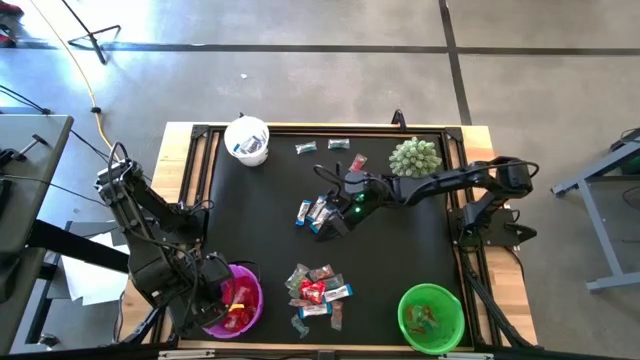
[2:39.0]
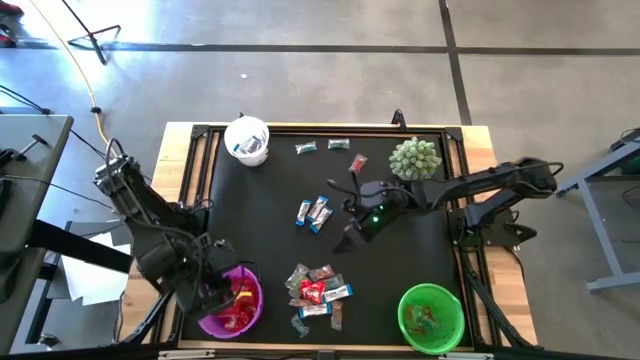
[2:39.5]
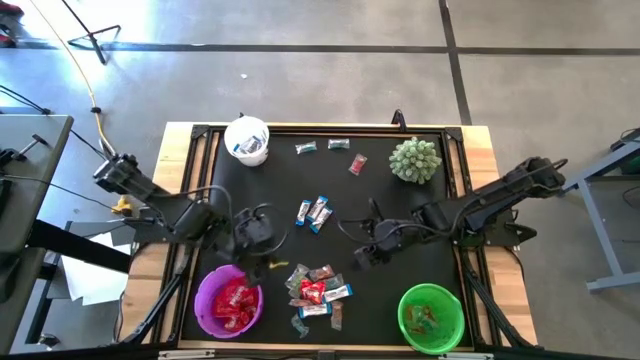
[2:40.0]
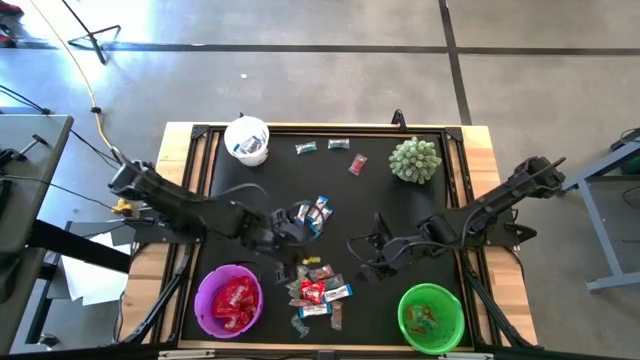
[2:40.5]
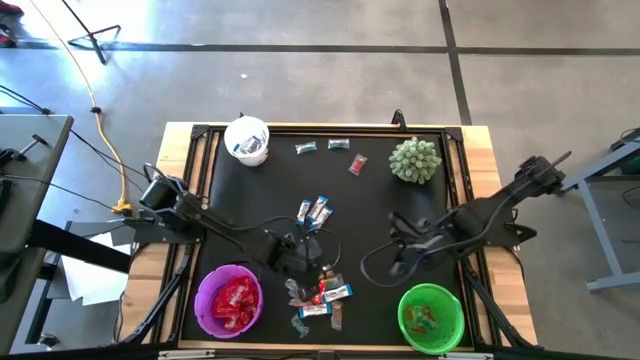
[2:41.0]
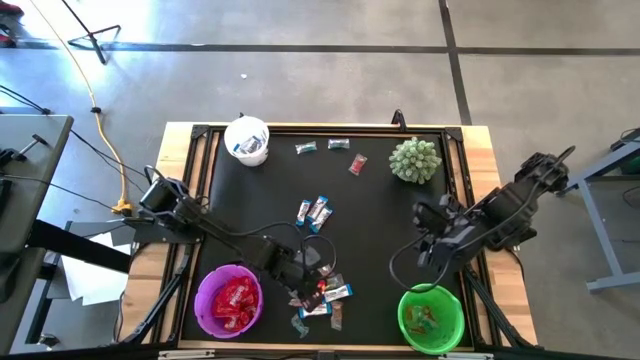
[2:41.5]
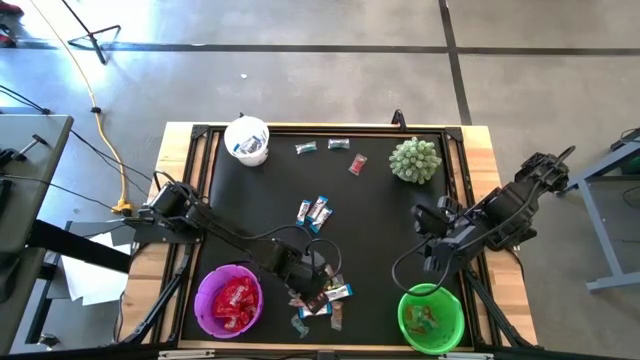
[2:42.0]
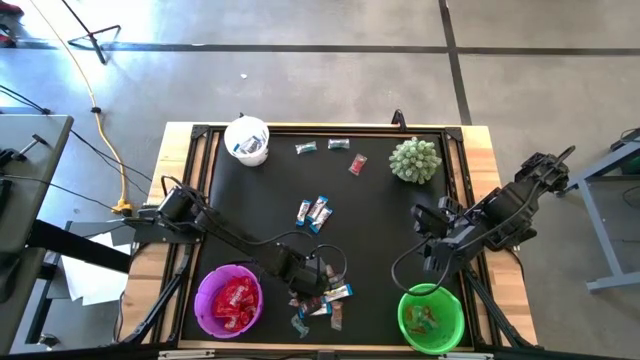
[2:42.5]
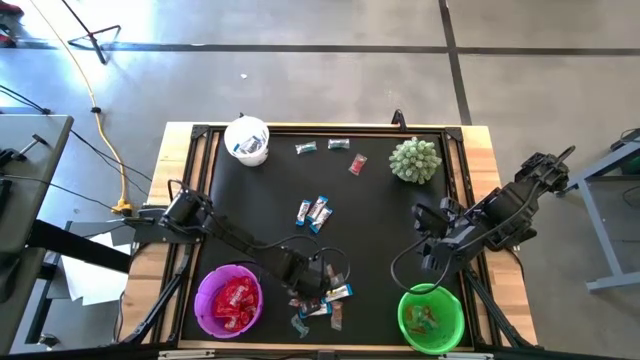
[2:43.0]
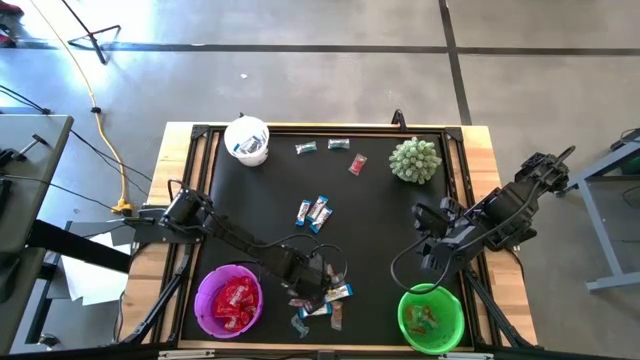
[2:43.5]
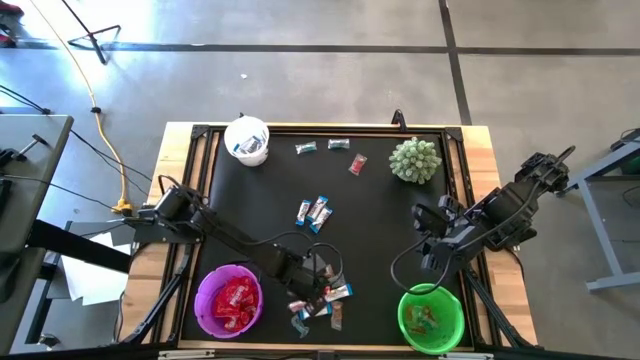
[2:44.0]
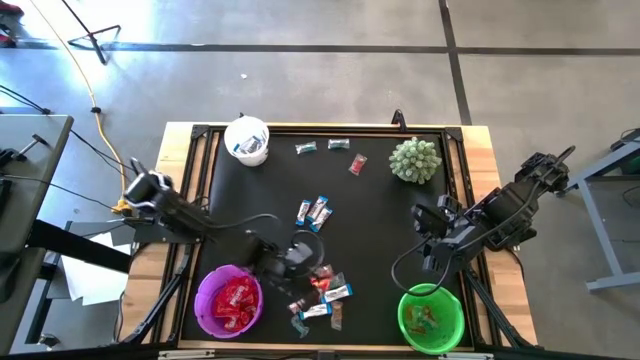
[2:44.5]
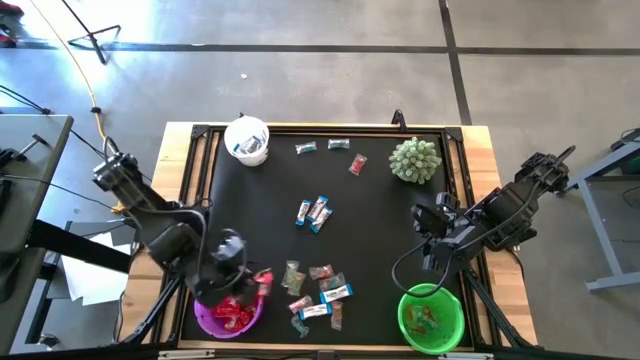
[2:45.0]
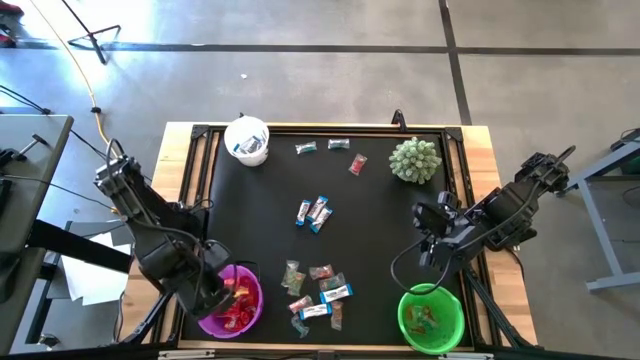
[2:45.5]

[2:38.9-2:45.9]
Task: Sort candy
Put the red candy into the violet bucket

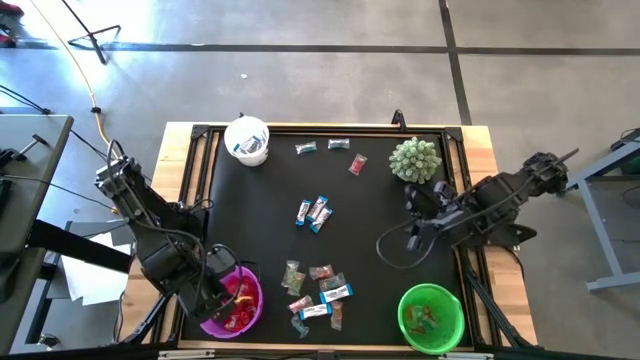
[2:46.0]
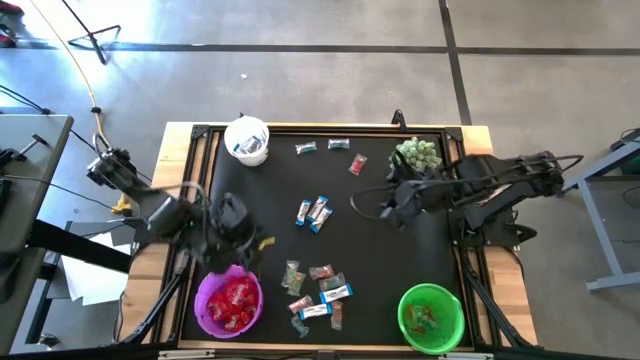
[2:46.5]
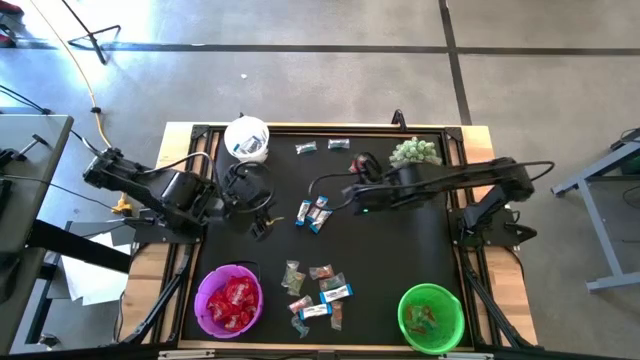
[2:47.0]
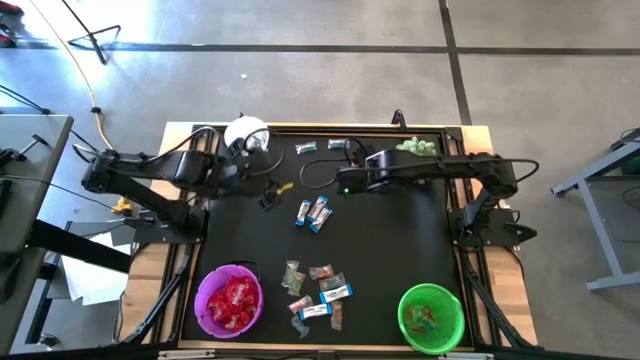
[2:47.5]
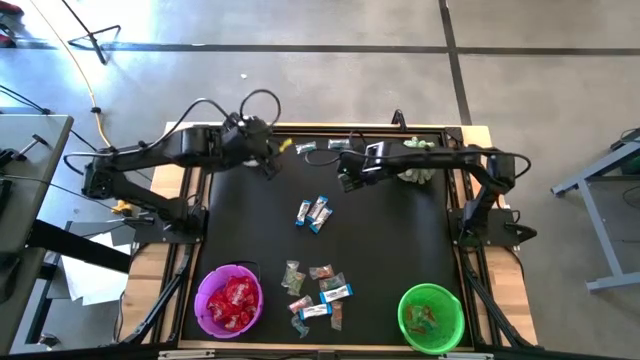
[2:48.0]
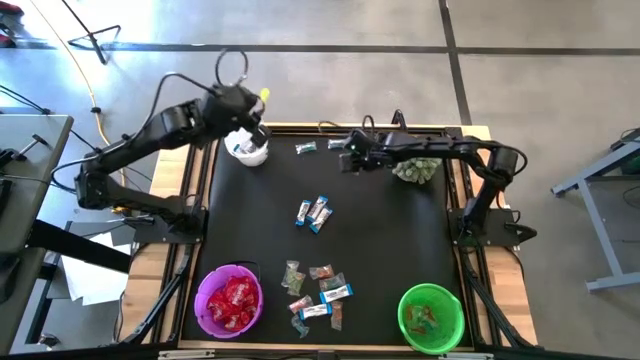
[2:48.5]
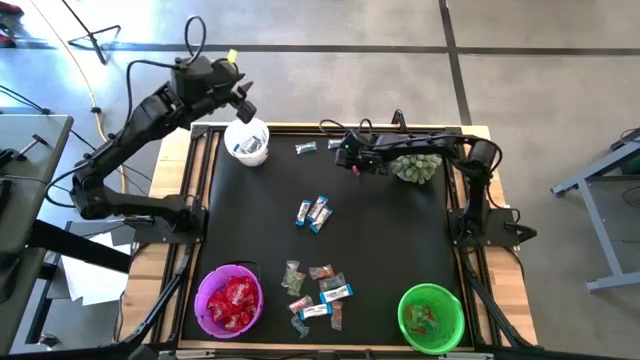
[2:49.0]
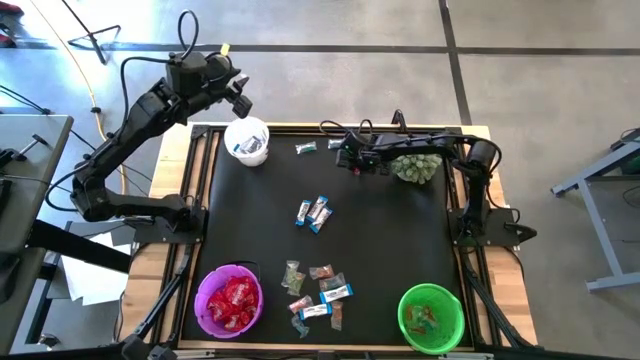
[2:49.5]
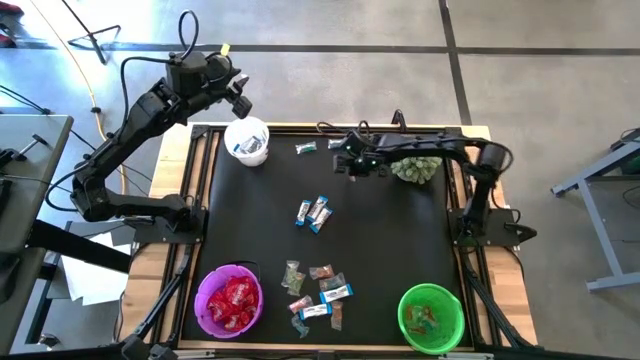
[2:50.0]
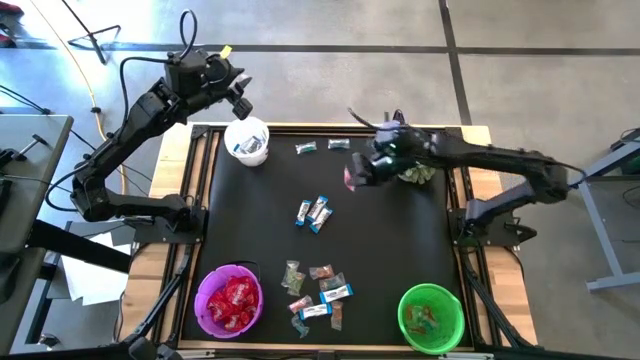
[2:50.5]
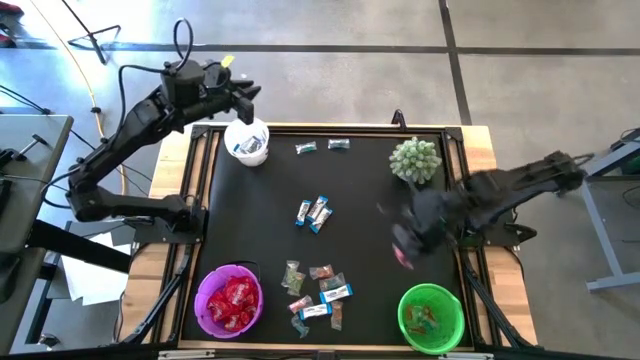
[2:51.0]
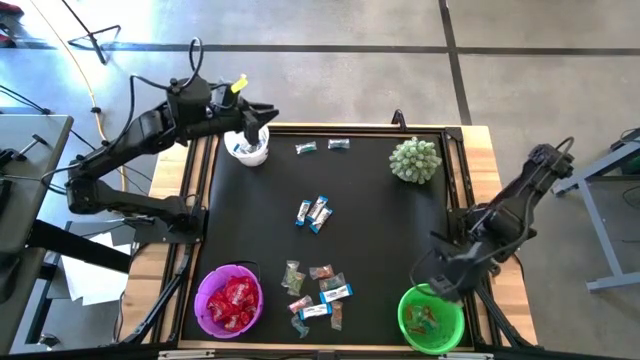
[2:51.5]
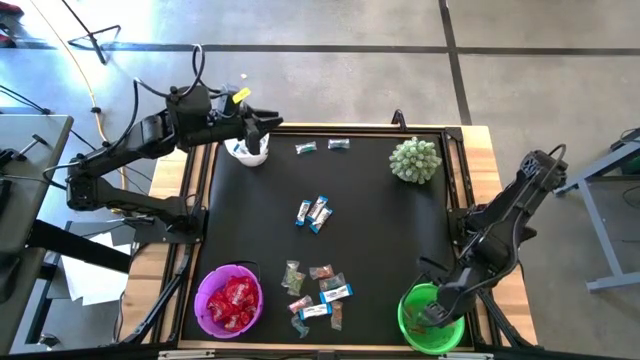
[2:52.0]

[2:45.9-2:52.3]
Put the red gummy into the green bucket

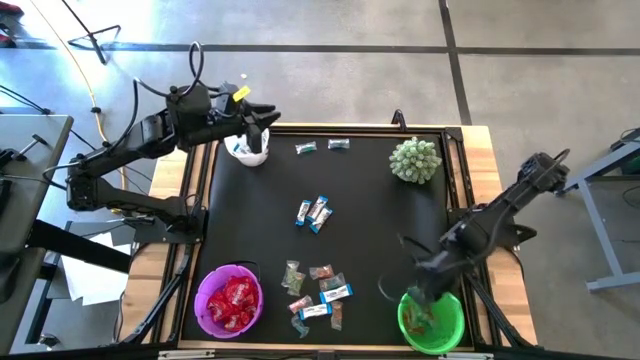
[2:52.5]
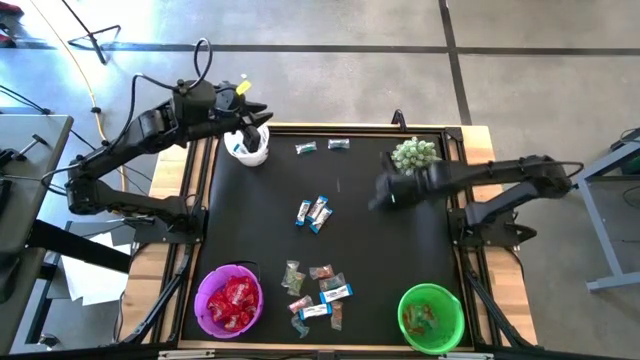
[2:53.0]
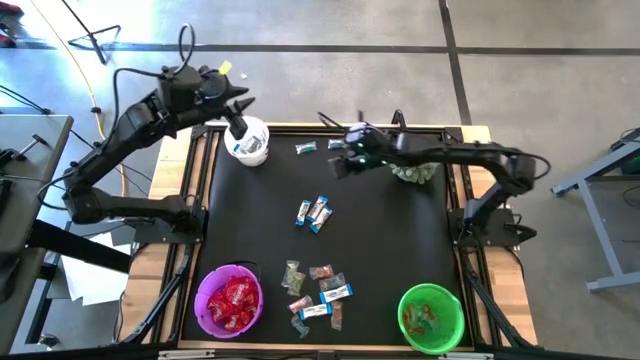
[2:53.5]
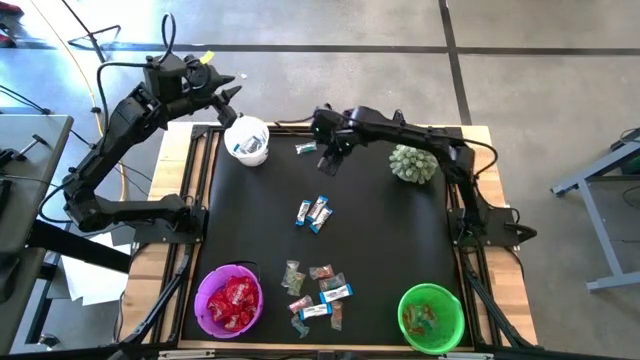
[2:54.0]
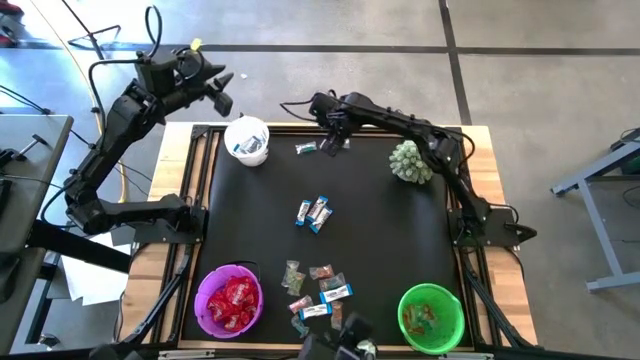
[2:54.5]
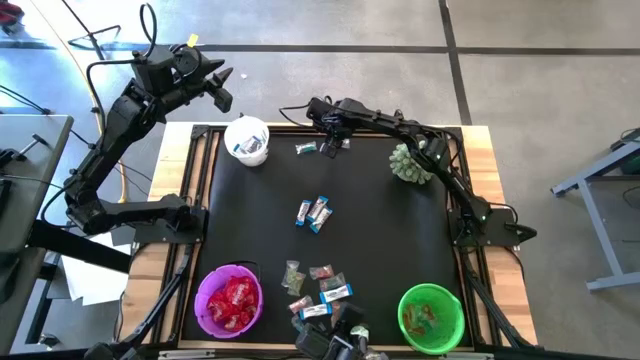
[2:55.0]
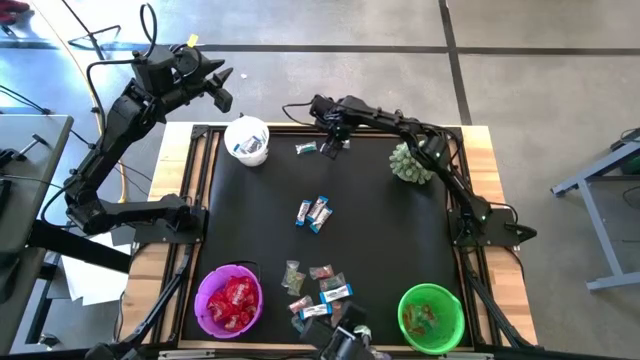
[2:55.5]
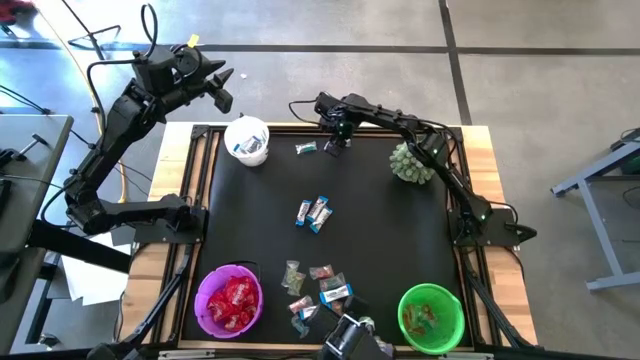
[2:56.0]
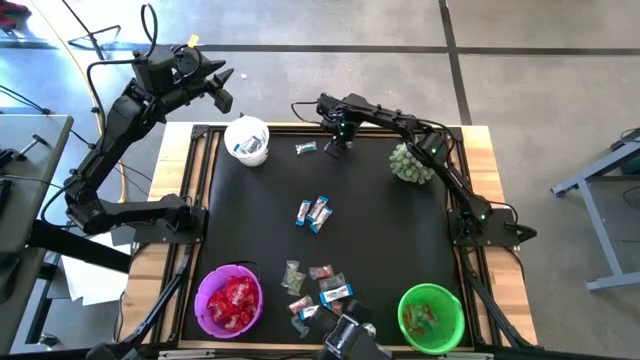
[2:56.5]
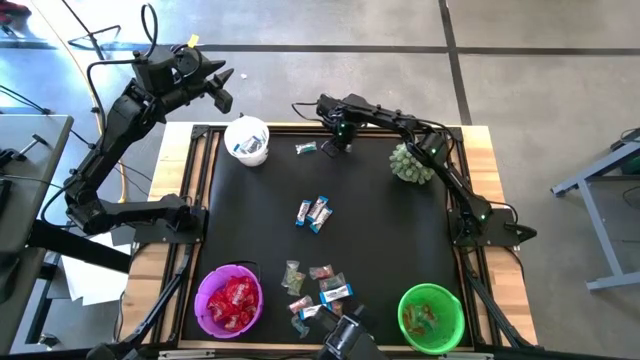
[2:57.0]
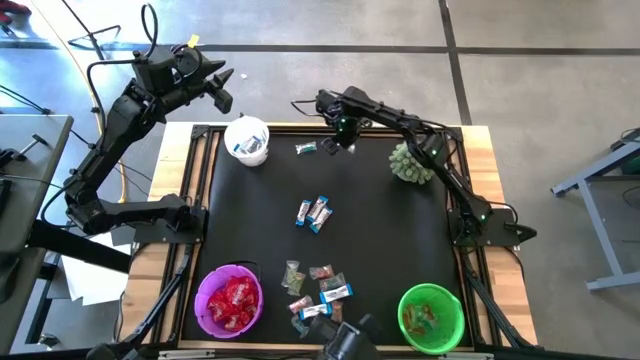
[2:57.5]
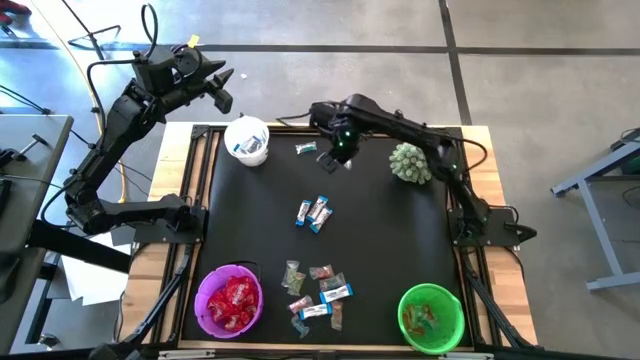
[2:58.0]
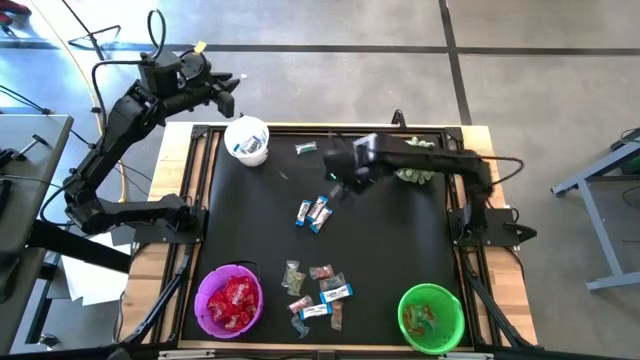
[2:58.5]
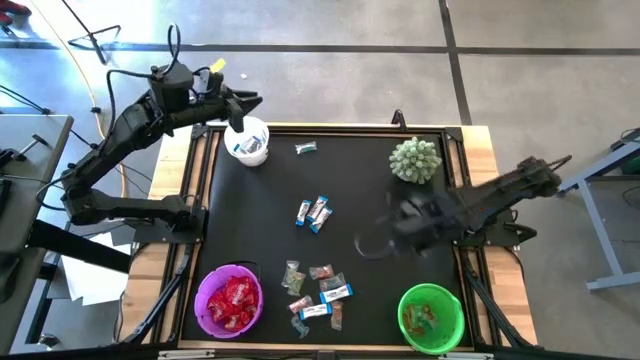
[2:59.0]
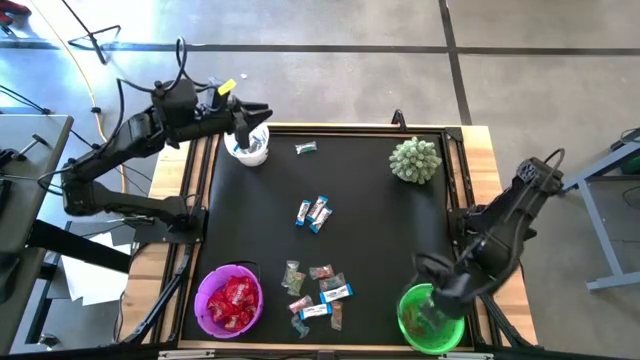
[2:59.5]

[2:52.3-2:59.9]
Put the blue gummy into the green bucket
